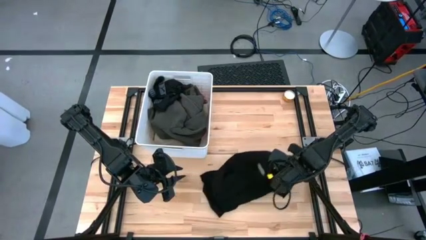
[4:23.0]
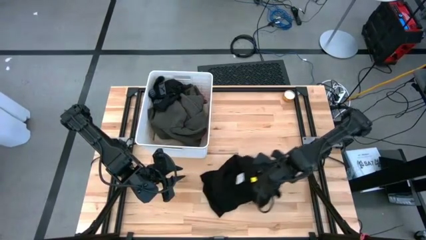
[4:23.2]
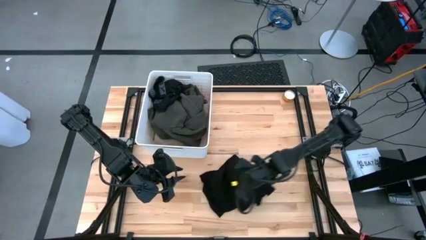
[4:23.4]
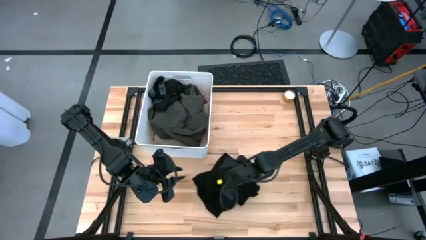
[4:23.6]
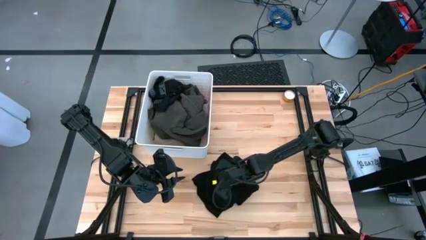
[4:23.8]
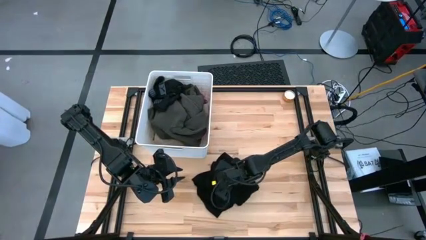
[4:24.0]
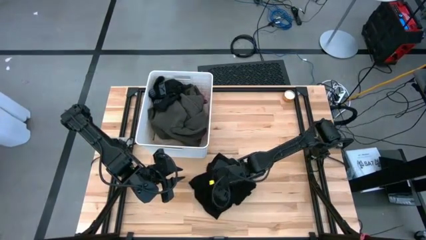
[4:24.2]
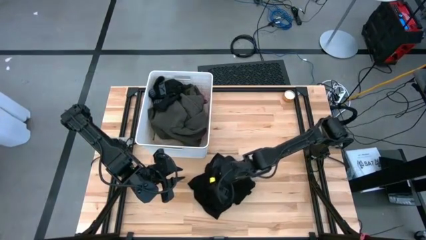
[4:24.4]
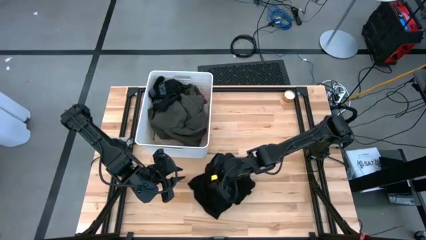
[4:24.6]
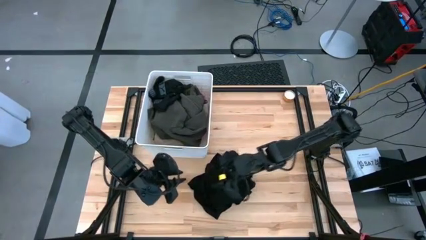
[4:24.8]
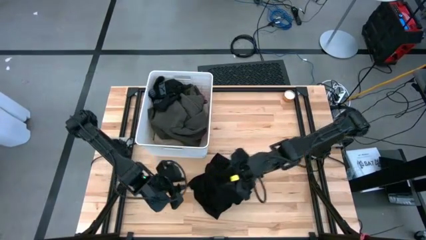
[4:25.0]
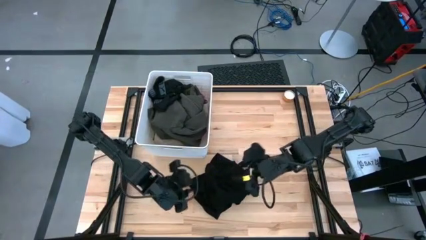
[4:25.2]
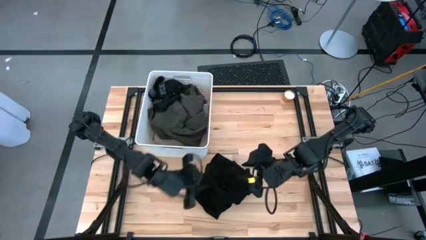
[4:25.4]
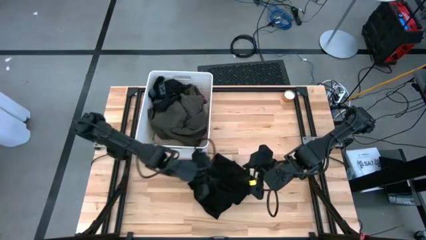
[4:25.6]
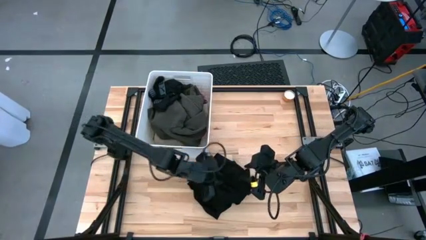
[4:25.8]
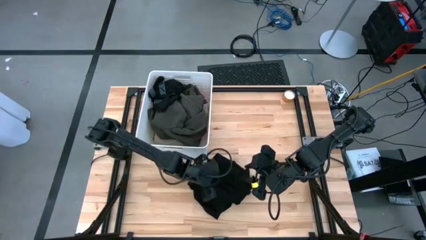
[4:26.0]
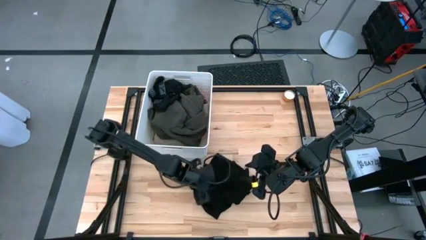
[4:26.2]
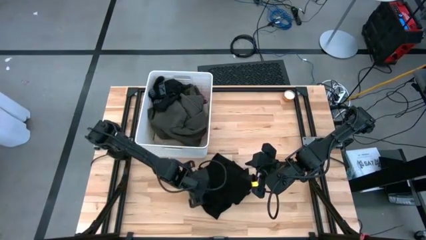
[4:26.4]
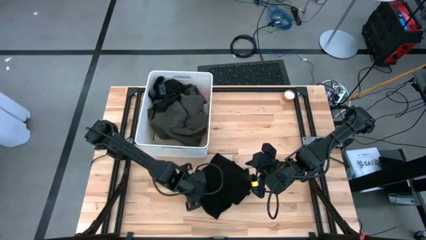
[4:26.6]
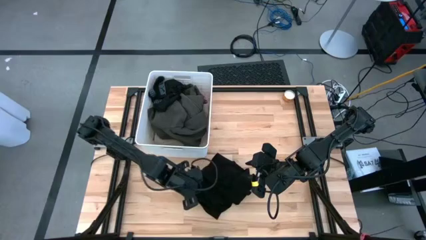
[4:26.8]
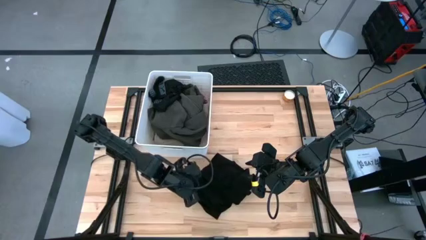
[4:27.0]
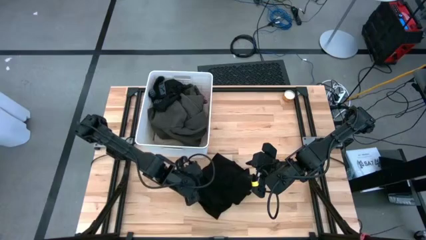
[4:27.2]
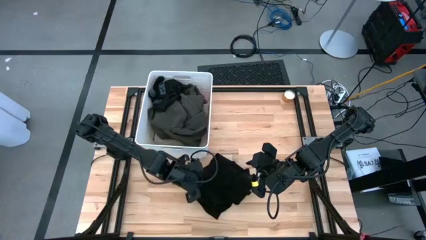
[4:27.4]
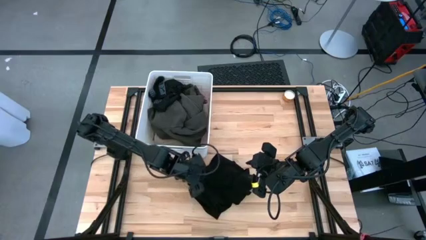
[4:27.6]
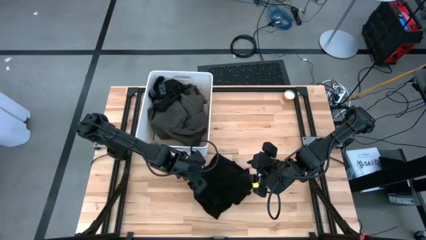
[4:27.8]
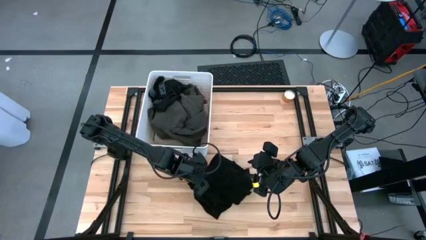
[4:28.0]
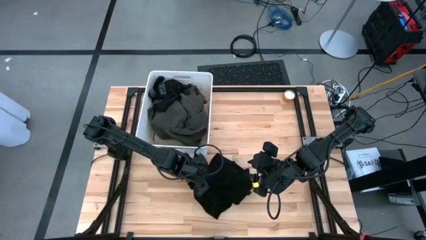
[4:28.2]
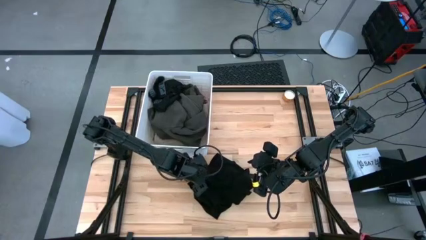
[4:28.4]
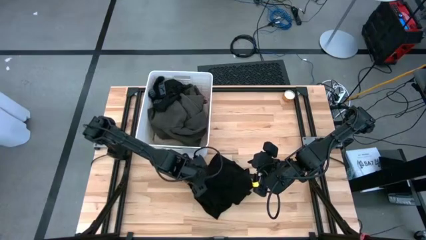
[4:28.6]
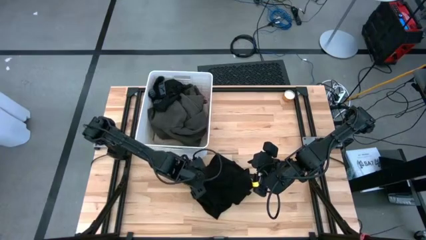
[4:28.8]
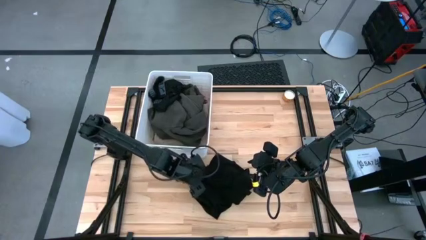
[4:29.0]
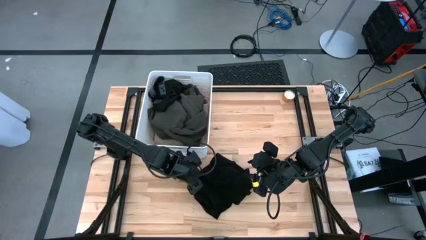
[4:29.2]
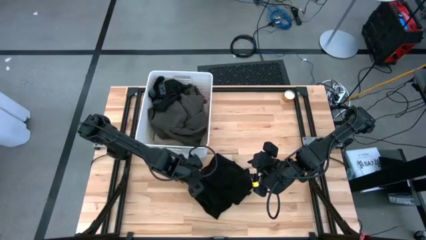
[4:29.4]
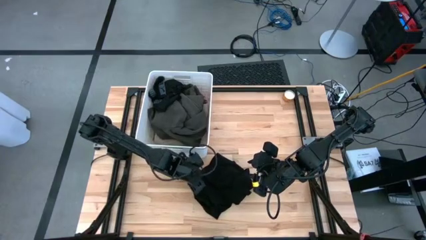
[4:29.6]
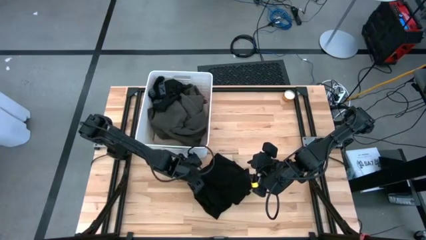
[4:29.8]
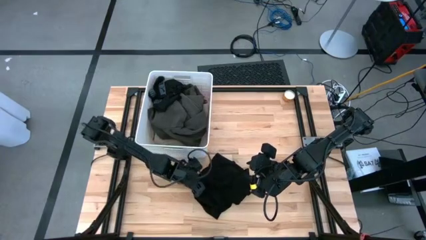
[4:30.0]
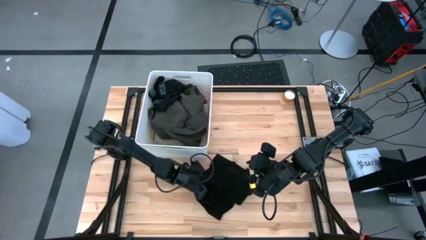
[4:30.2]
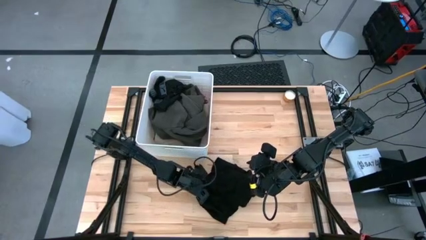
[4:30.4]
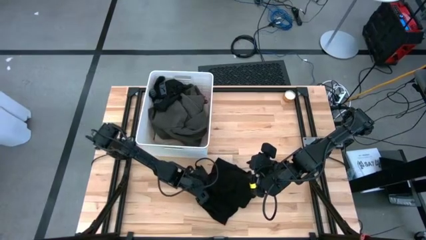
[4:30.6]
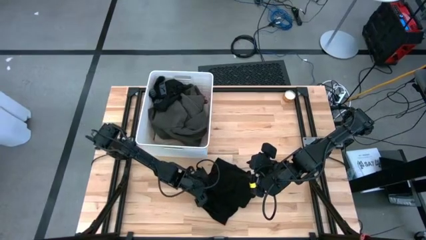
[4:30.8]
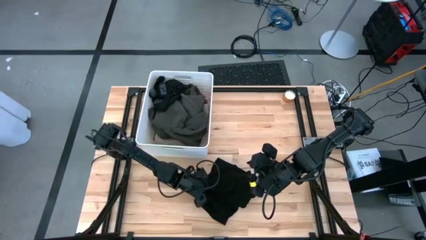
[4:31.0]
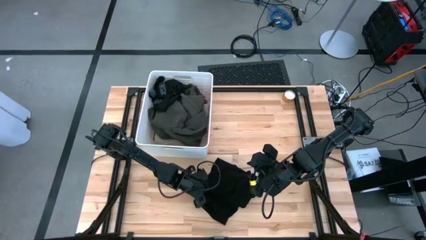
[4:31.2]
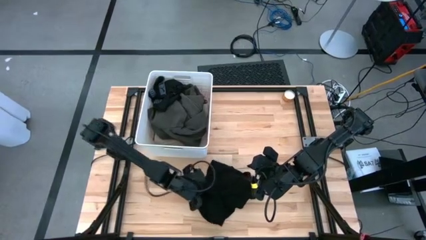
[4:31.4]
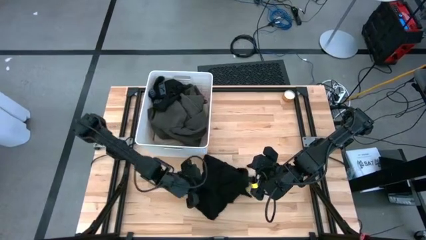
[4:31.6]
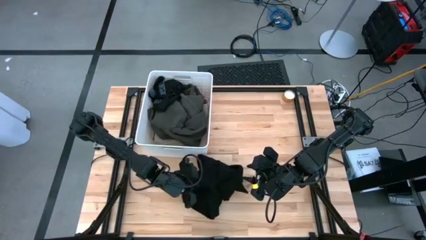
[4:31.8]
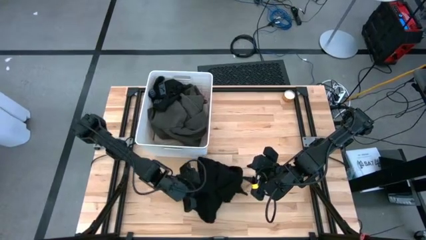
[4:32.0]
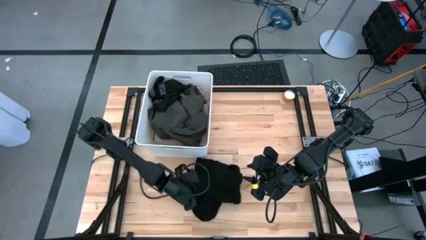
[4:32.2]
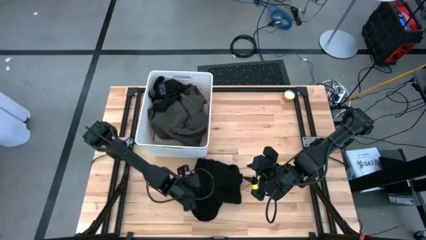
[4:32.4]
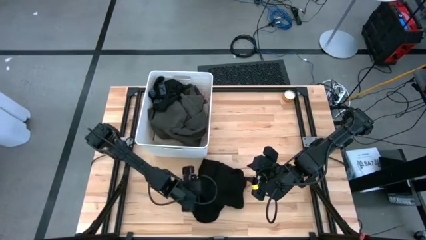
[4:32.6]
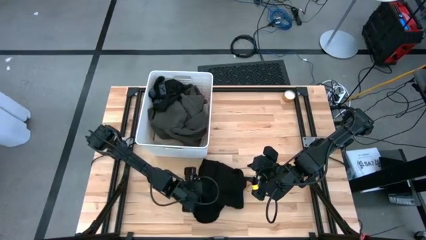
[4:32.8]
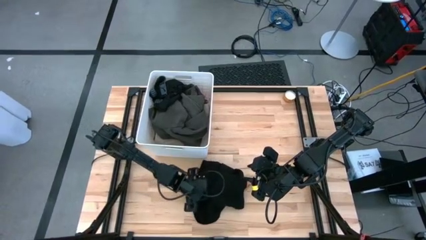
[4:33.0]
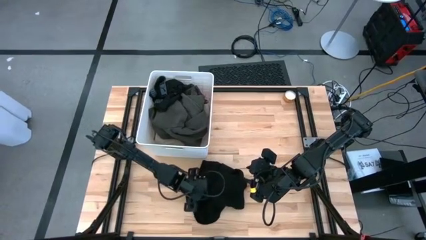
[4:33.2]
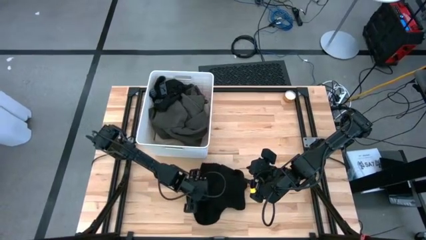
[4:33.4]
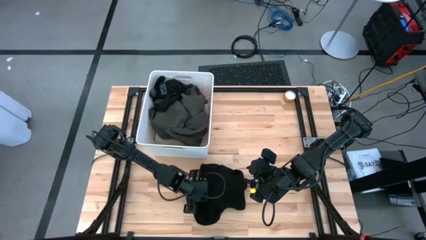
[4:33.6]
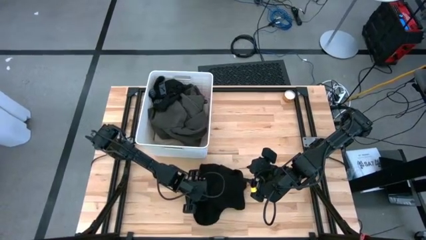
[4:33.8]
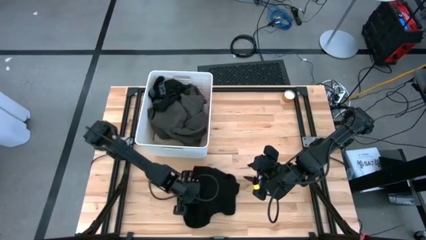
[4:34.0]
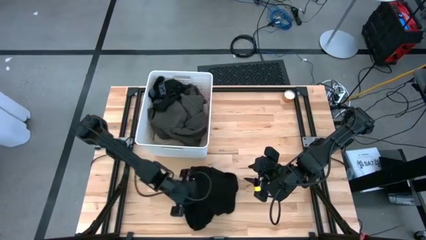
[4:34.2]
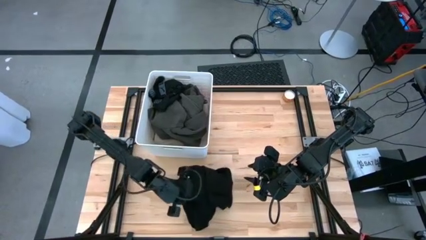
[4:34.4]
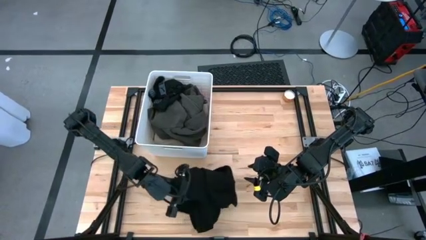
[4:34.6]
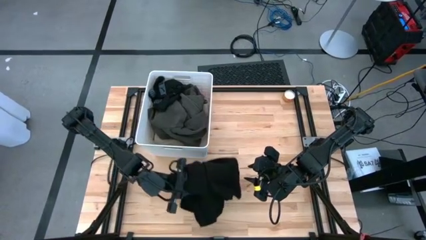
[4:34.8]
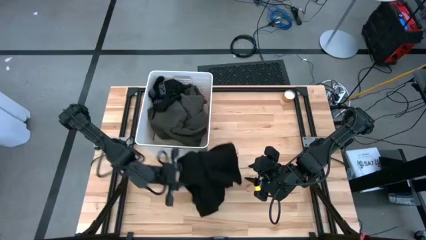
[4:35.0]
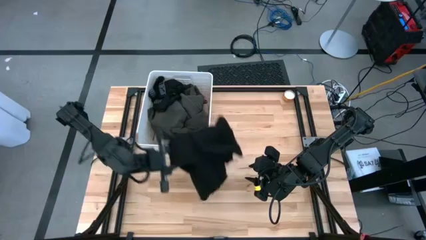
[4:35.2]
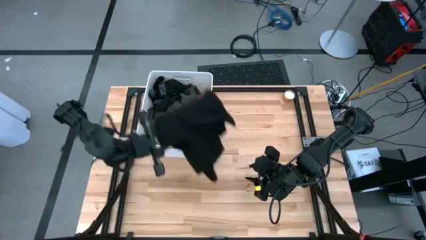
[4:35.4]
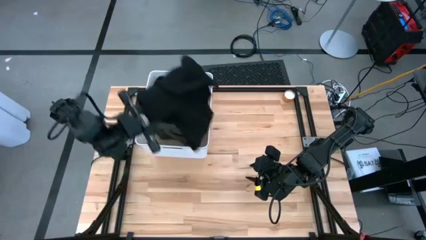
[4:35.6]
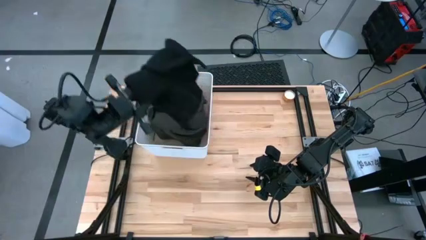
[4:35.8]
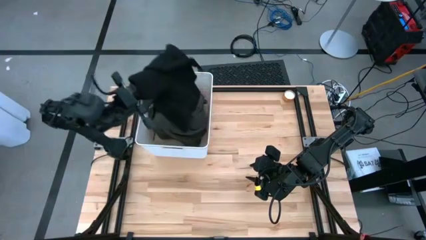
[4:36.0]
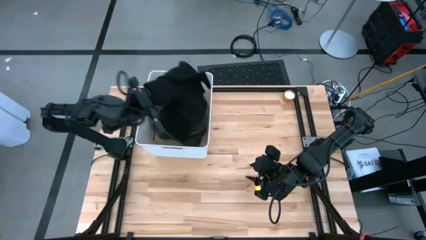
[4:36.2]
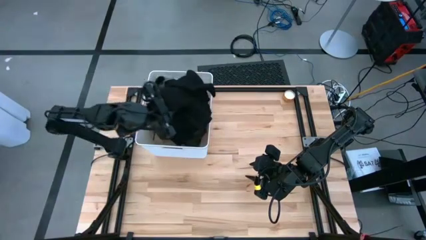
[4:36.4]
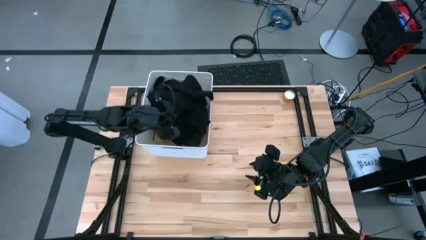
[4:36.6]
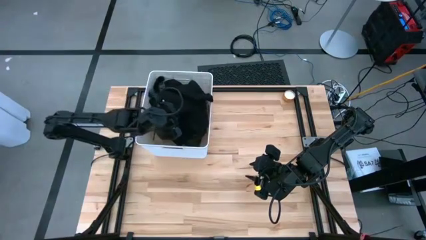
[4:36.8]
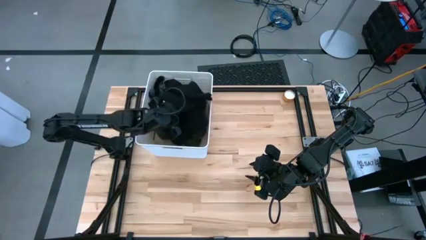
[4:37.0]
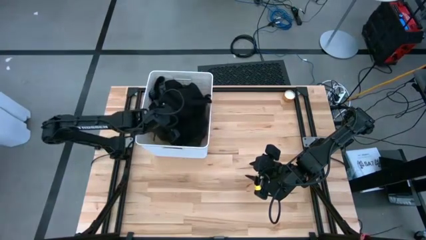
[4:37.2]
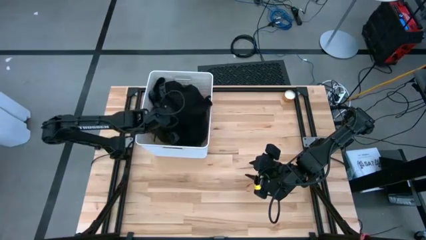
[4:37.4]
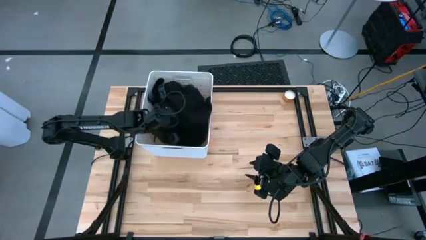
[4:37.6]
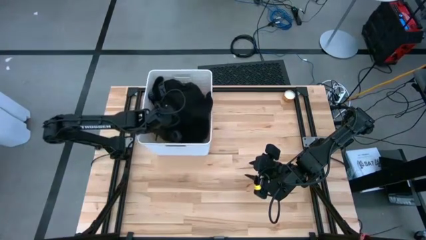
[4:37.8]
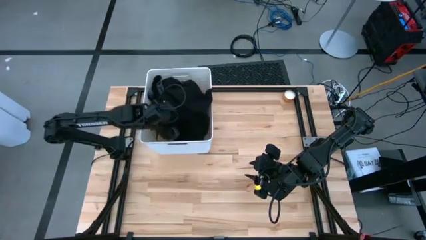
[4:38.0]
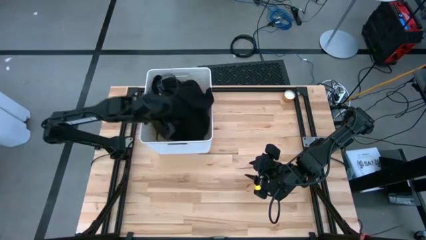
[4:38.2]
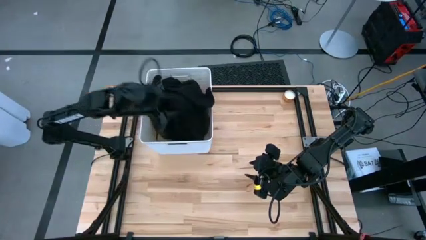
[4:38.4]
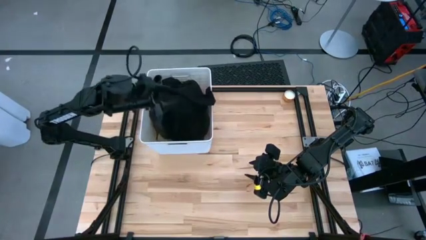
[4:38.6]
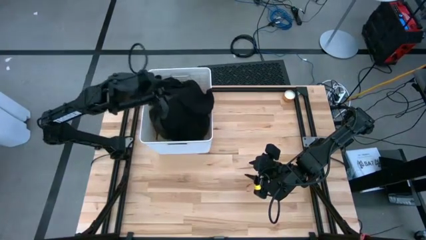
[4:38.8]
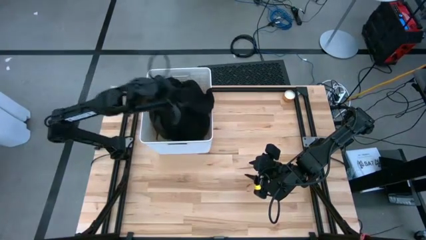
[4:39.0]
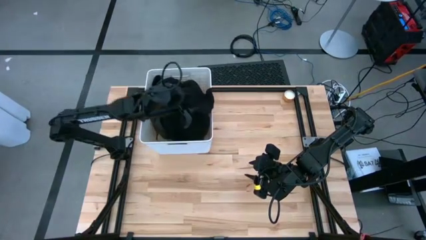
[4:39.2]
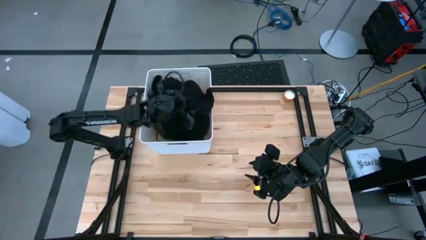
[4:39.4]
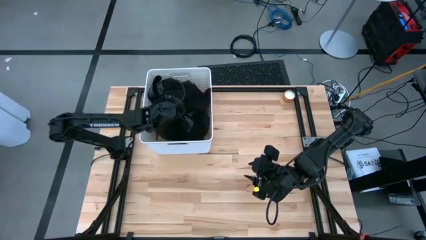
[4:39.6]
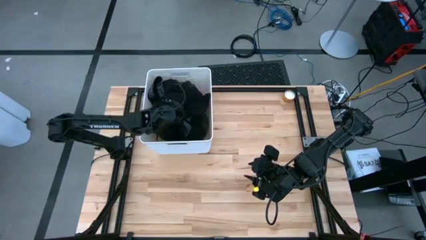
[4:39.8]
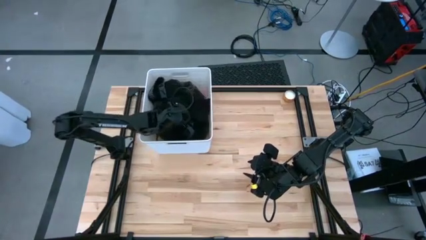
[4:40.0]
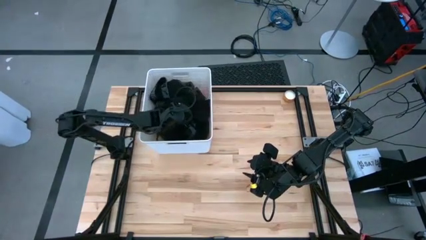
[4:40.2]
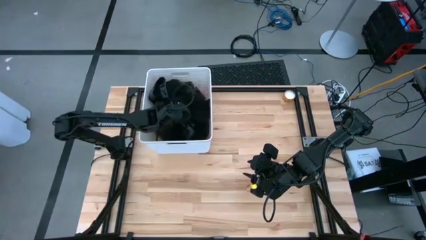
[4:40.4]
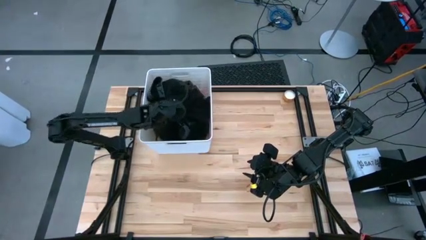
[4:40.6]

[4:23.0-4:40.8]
Task: Sort clothes
Put the black shirt into the white laundry bin
